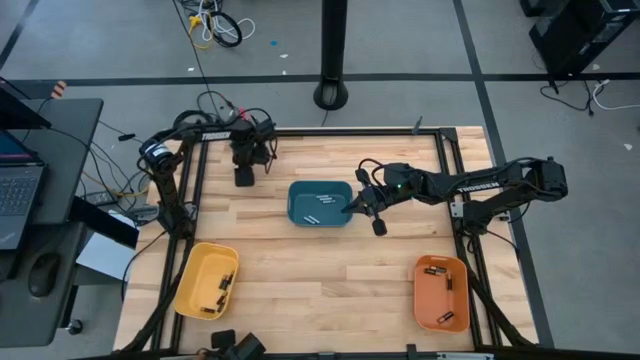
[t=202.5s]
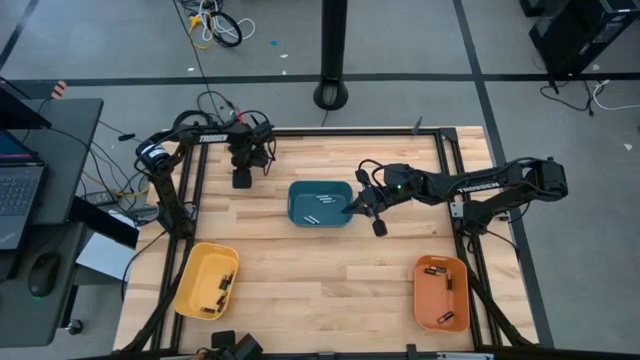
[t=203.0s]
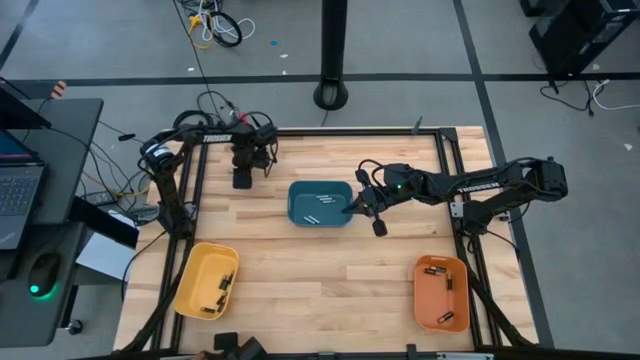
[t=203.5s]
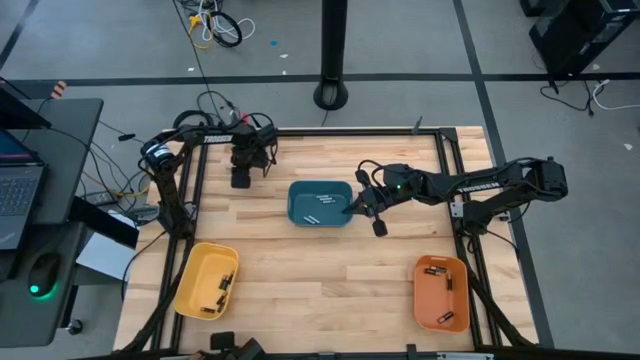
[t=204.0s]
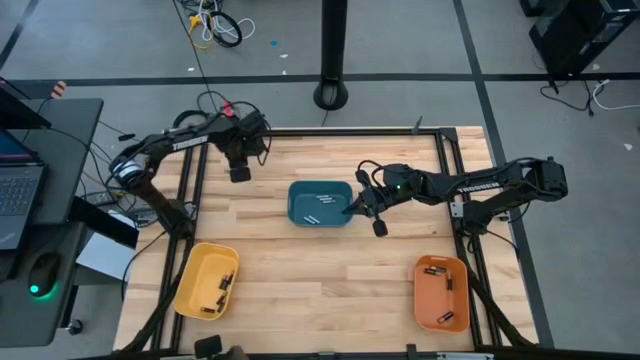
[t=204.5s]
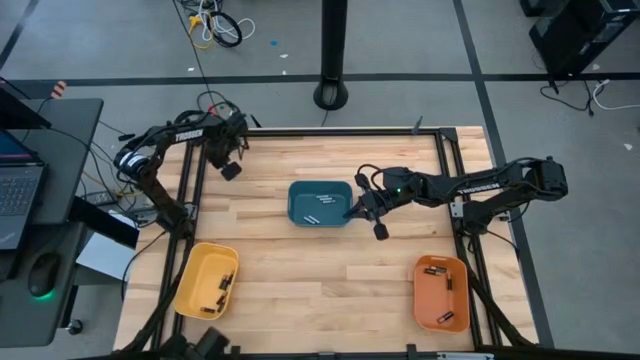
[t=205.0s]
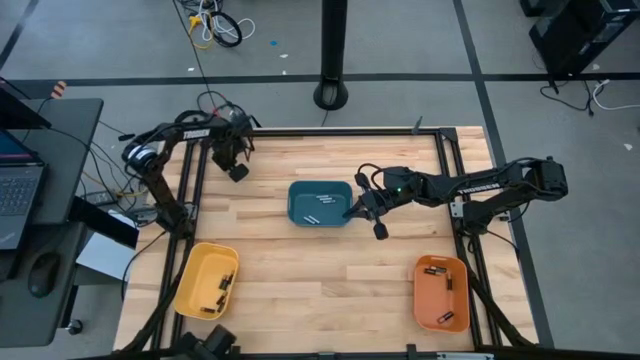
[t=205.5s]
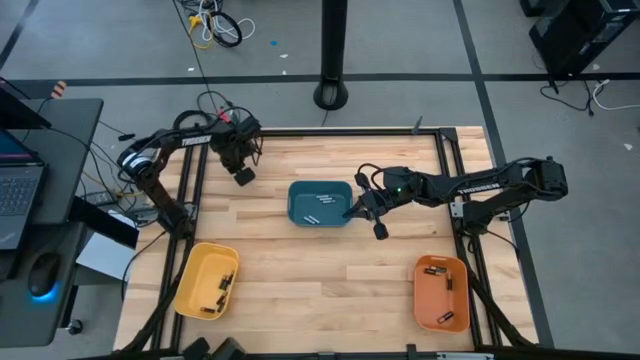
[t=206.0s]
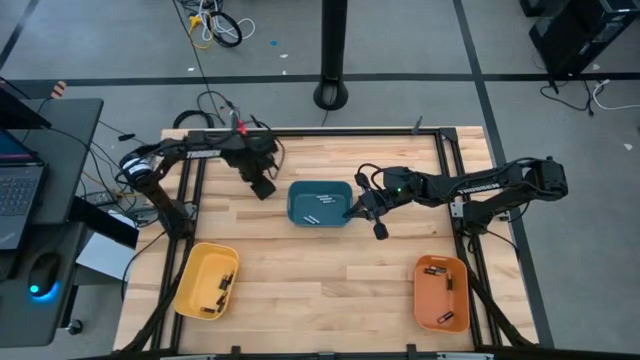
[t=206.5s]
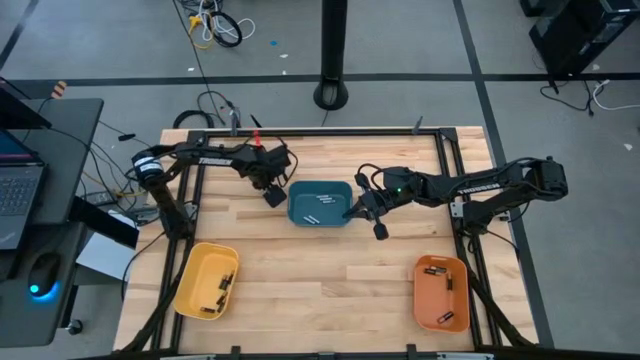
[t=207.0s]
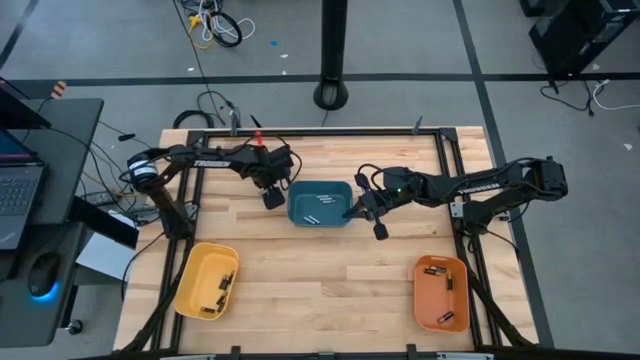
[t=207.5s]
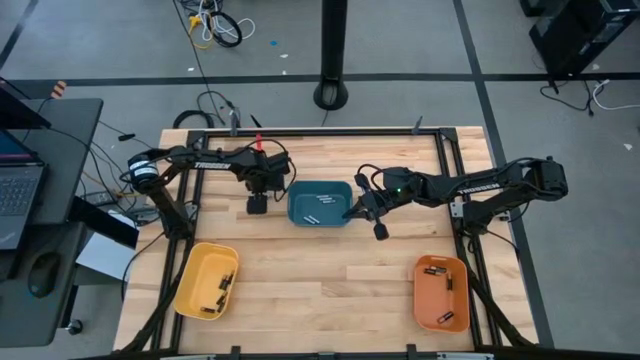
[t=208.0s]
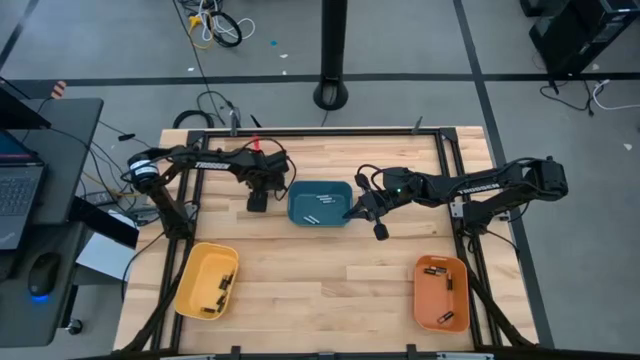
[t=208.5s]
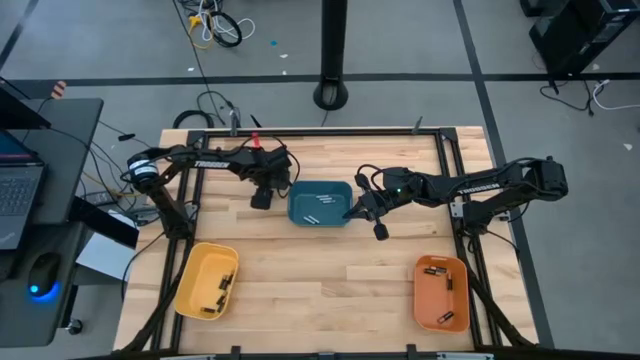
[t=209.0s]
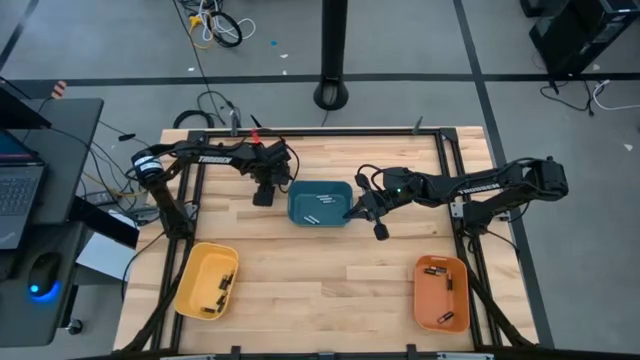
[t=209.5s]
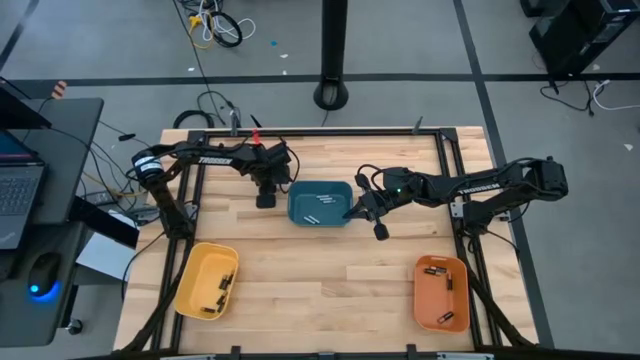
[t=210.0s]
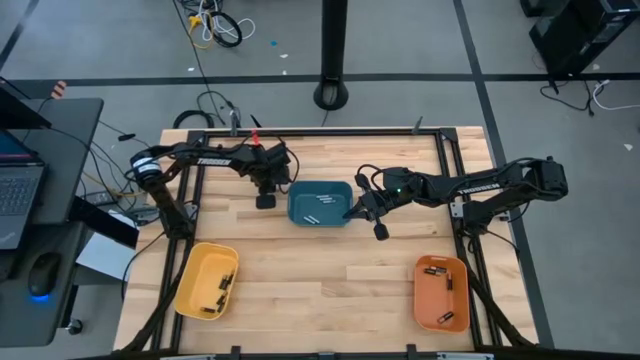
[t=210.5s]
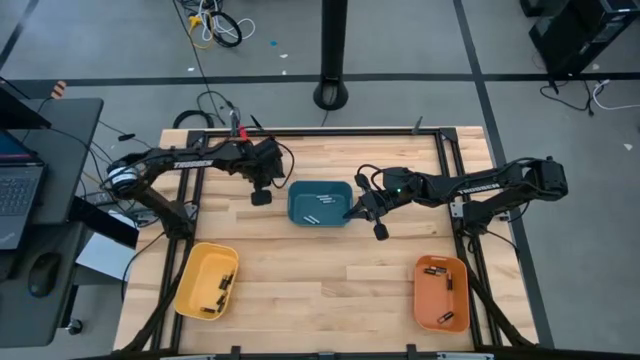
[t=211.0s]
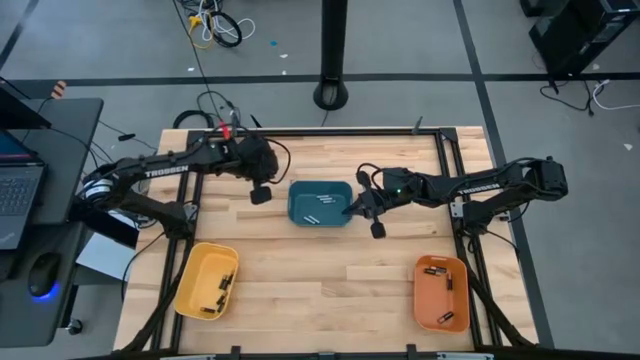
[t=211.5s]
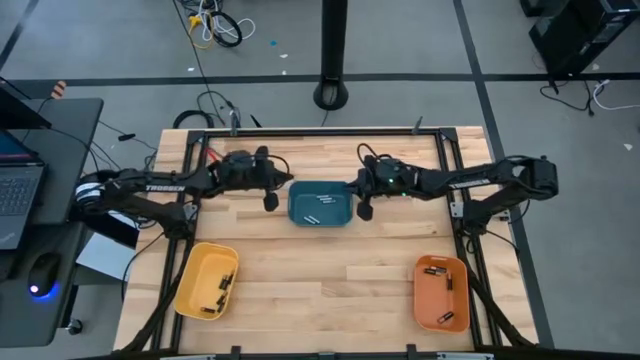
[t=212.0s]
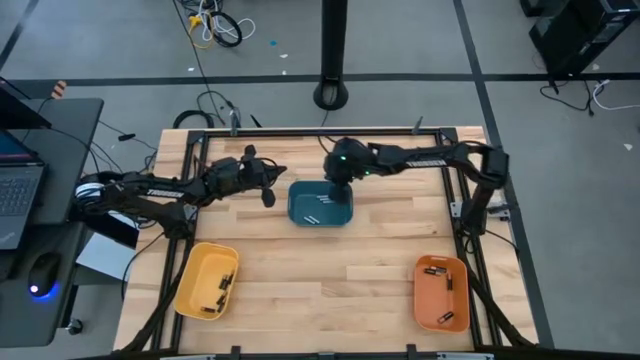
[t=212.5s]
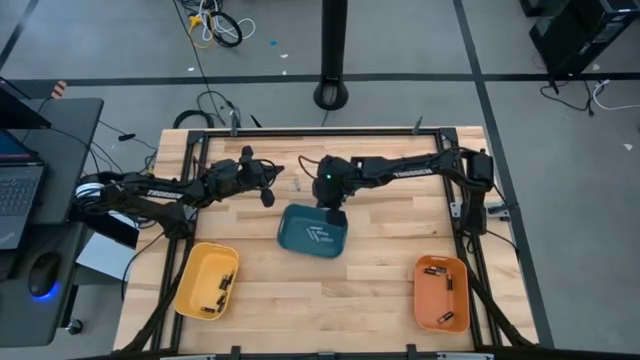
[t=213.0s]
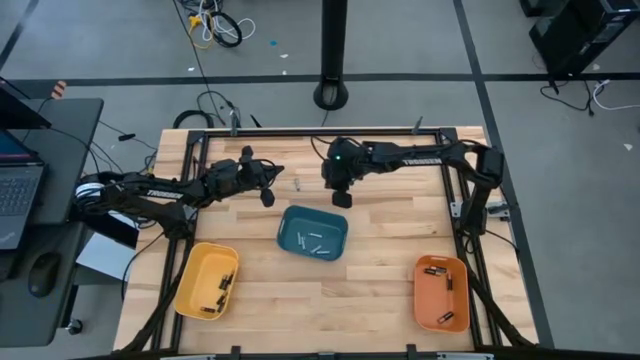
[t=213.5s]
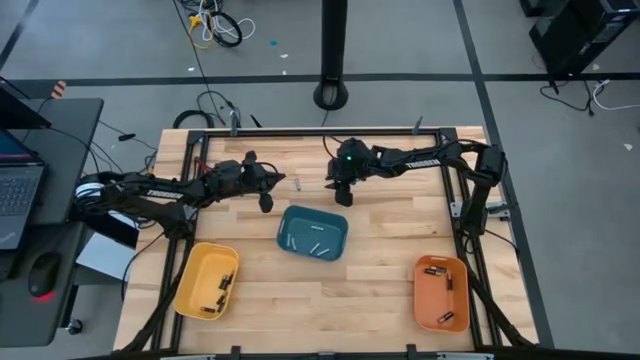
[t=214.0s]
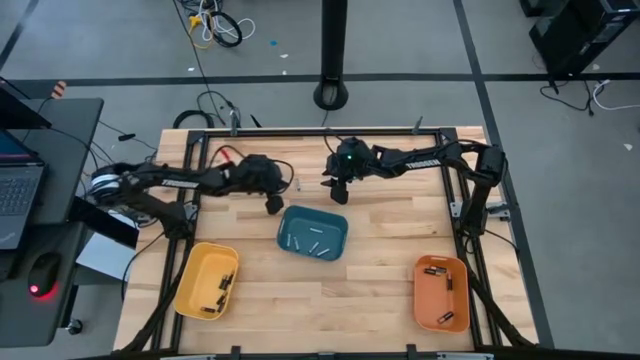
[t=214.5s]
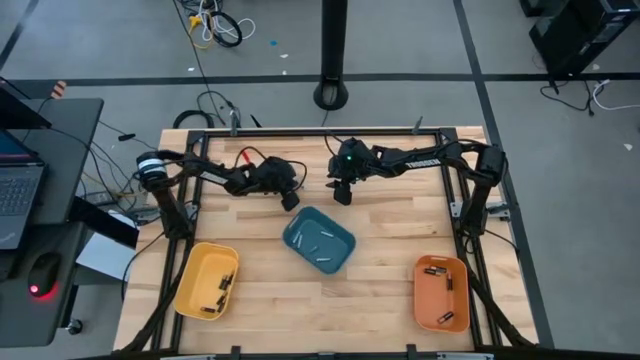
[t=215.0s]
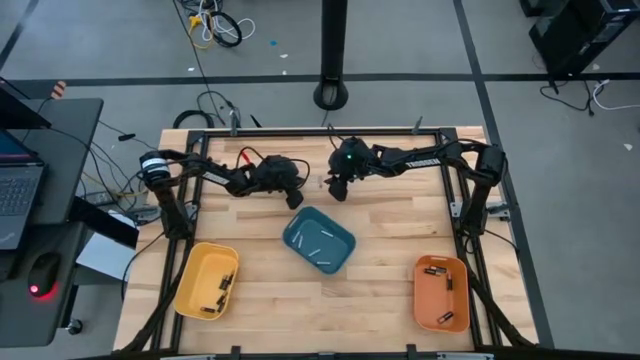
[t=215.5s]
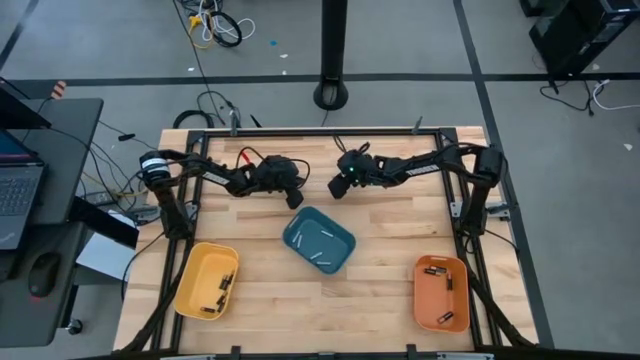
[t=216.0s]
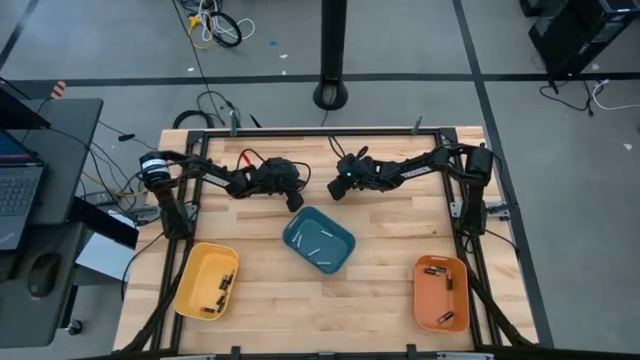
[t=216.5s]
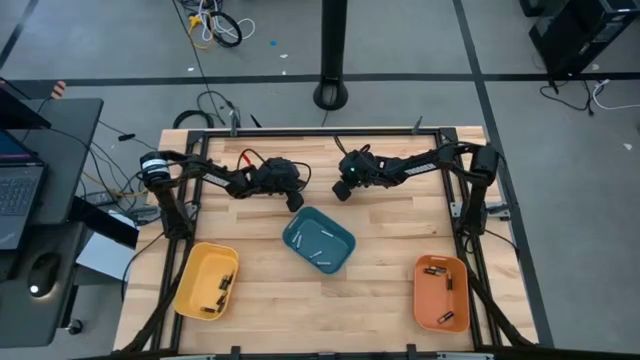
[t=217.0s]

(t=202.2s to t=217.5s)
Task: Sort batteries
Put the silver battery into the blue bin

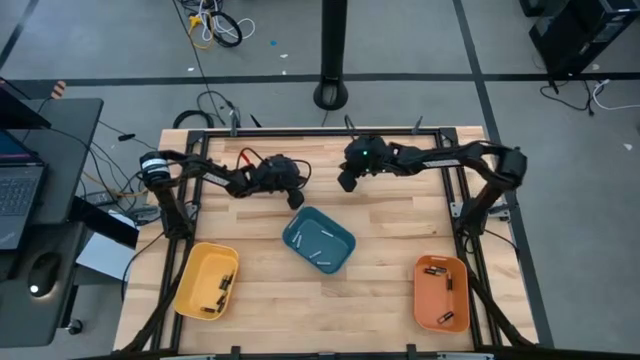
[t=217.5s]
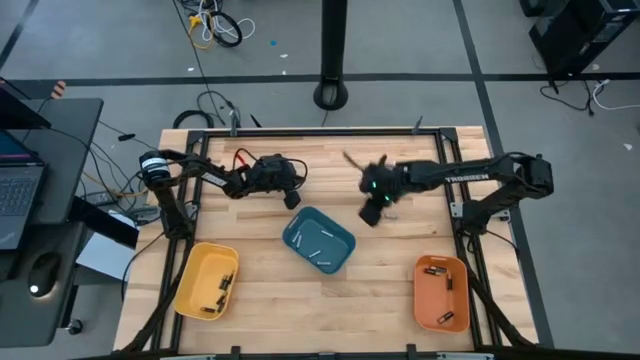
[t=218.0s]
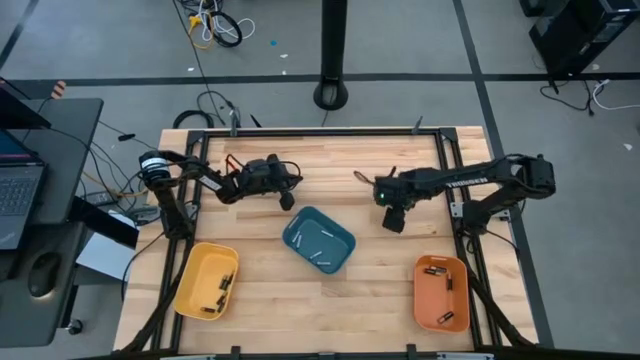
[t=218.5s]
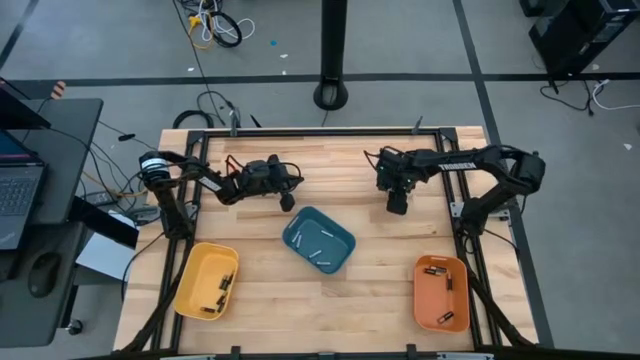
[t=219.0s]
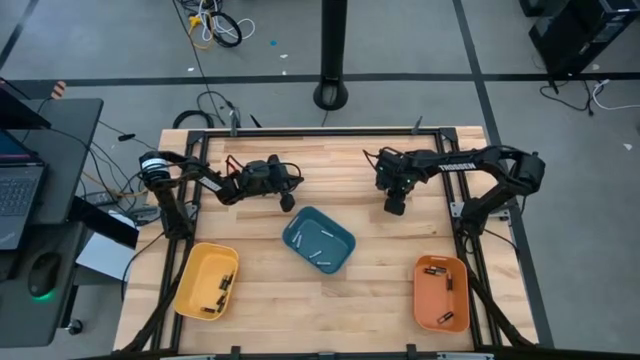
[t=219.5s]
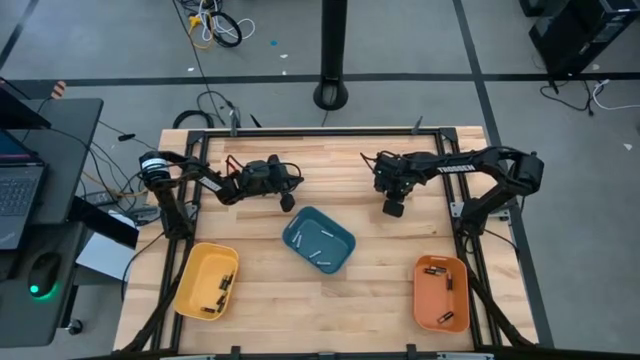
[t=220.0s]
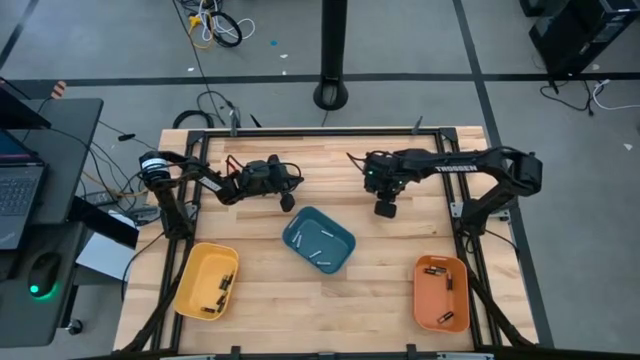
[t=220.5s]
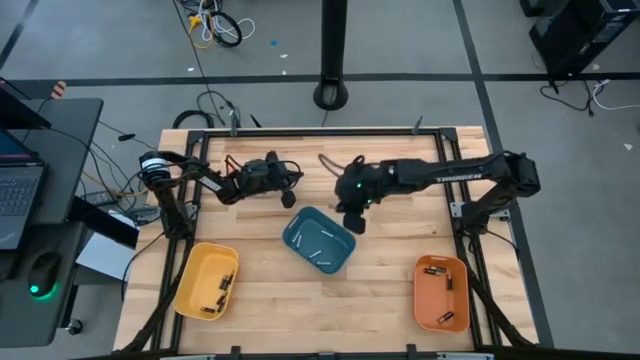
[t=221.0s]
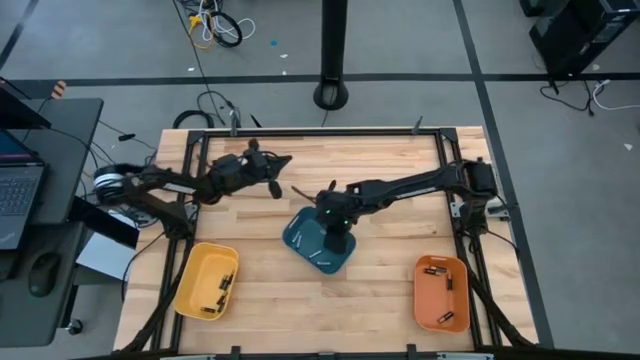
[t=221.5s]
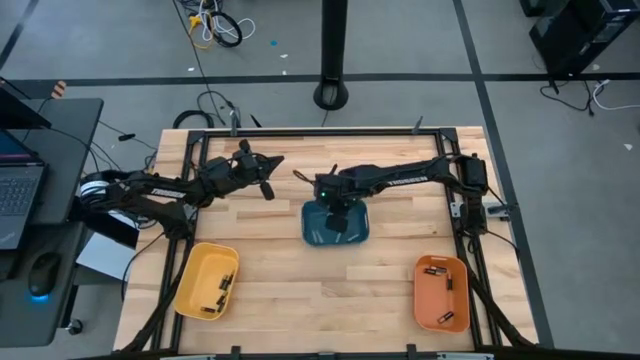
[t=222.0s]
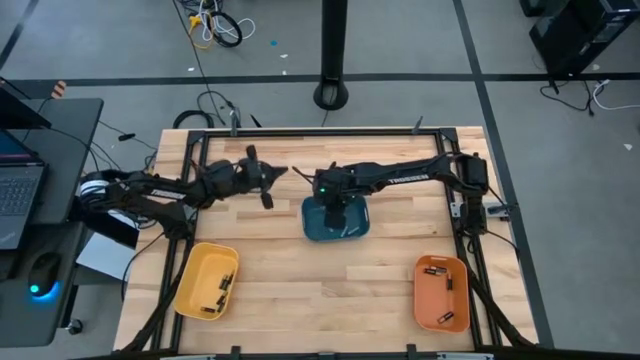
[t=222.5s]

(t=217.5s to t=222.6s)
Put the silver battery into the blue bin

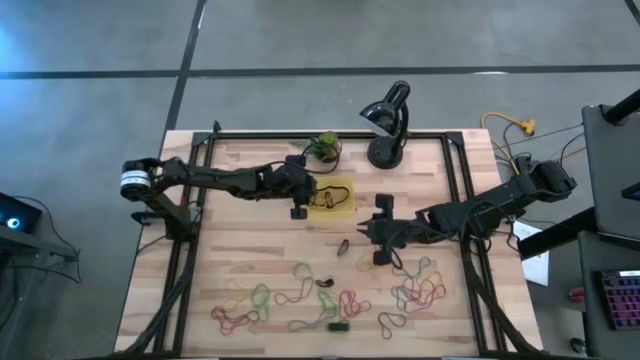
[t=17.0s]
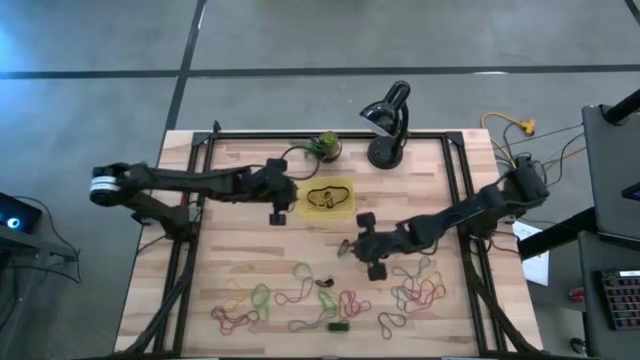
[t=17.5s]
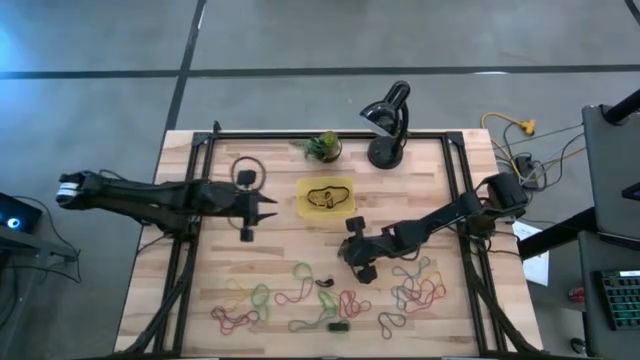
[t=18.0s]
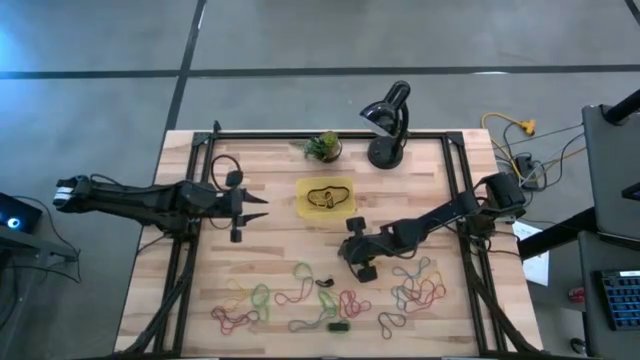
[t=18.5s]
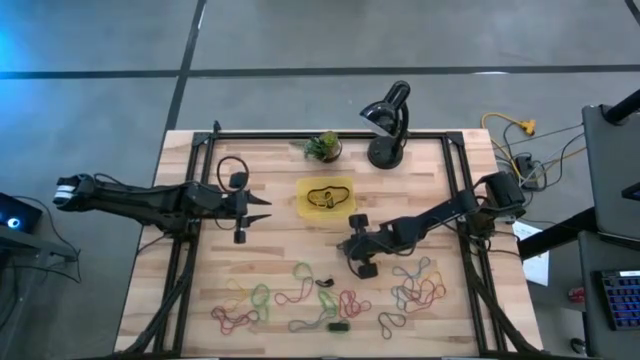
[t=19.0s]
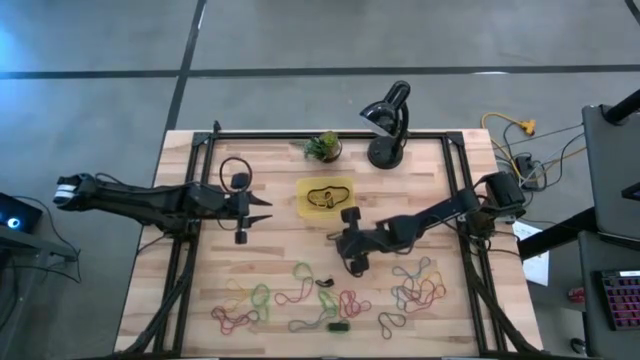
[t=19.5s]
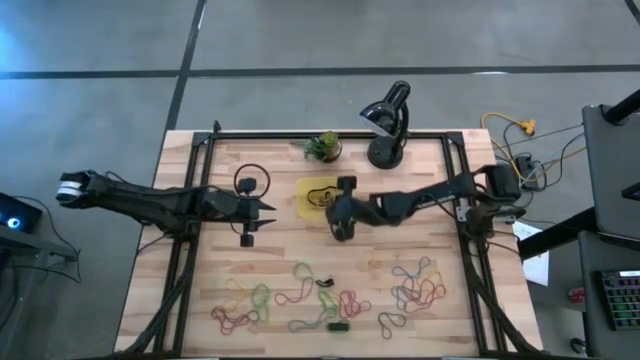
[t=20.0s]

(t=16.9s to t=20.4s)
Task: Pick and place rubber bands into bin
Put the black rubber band in the yellow bin
